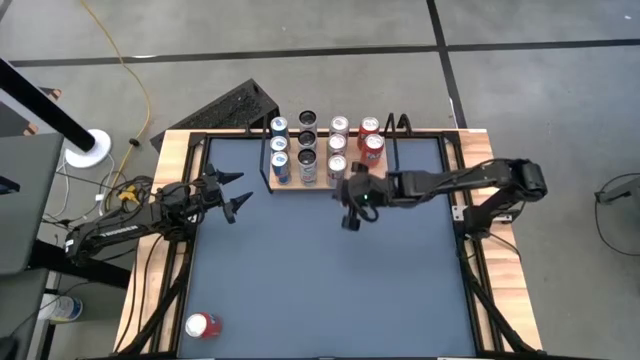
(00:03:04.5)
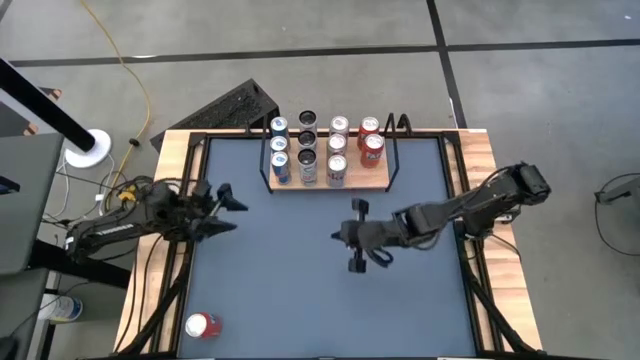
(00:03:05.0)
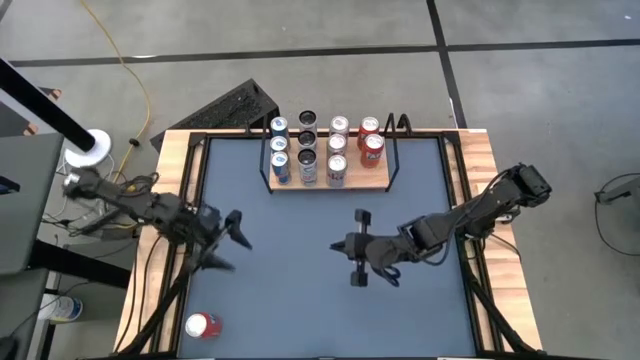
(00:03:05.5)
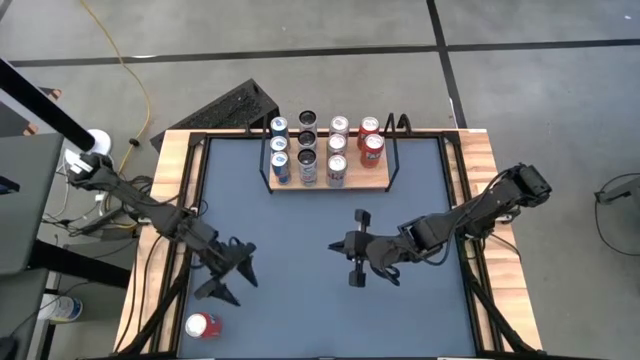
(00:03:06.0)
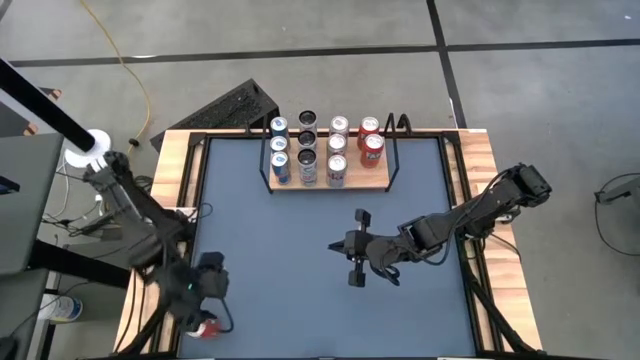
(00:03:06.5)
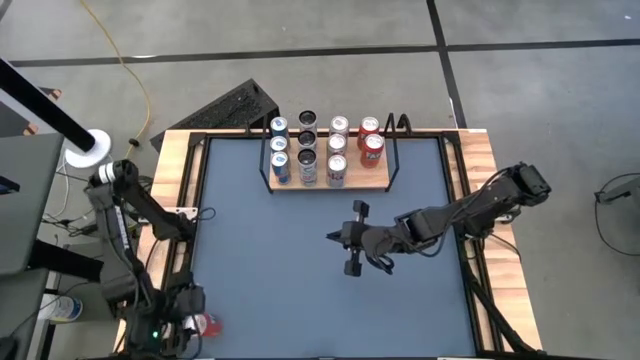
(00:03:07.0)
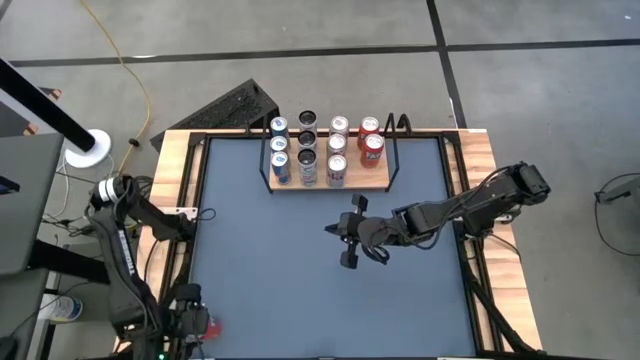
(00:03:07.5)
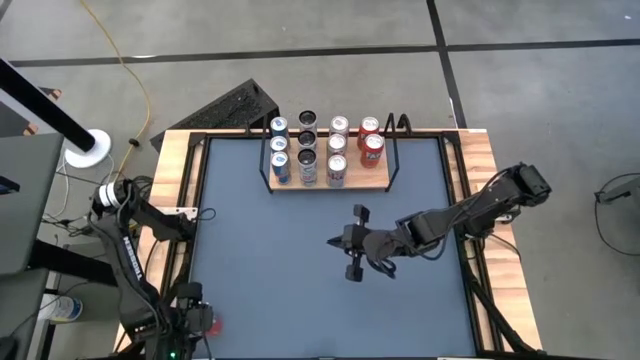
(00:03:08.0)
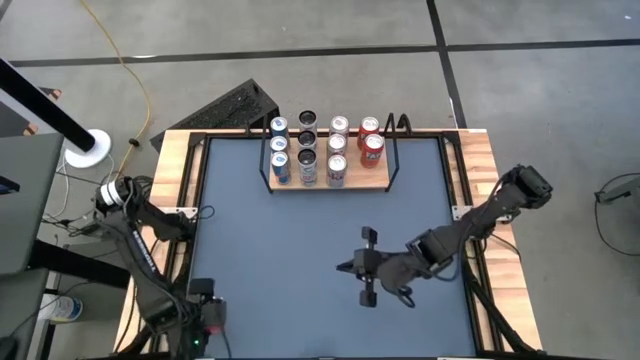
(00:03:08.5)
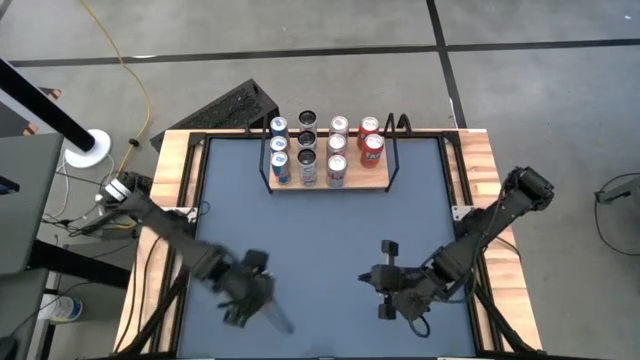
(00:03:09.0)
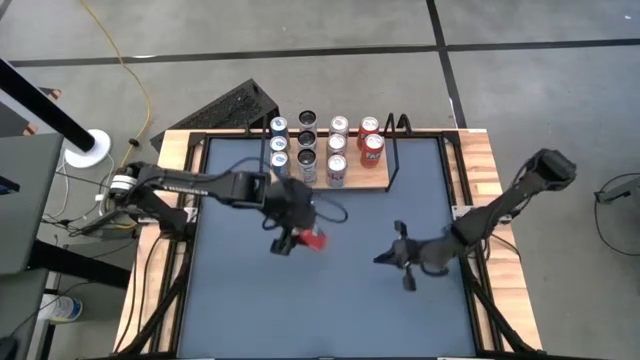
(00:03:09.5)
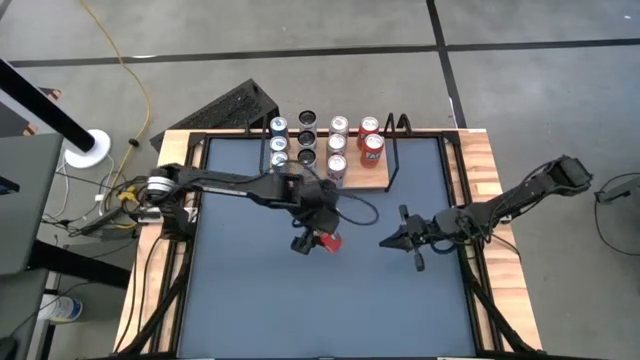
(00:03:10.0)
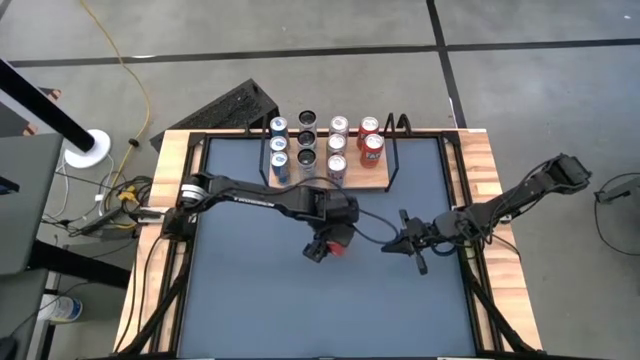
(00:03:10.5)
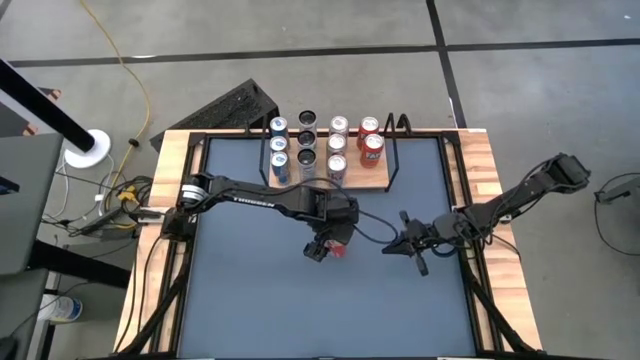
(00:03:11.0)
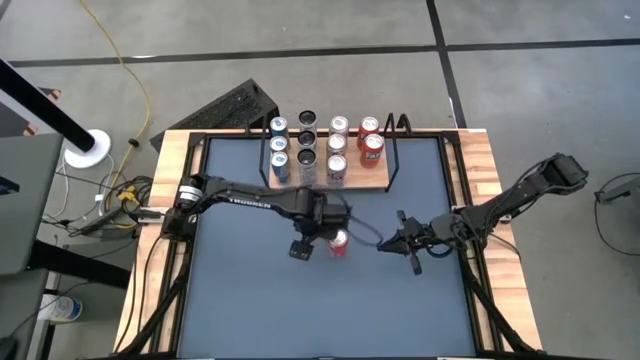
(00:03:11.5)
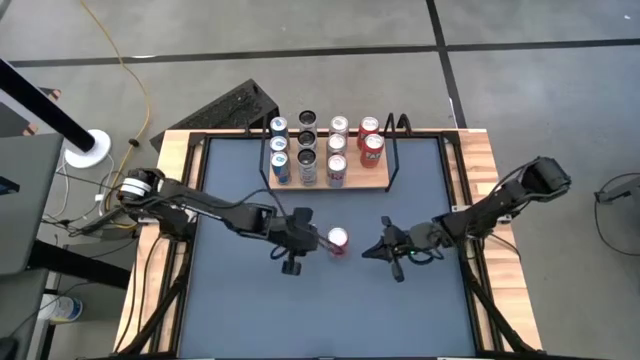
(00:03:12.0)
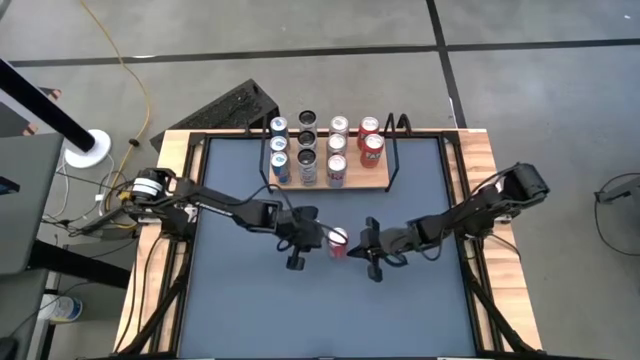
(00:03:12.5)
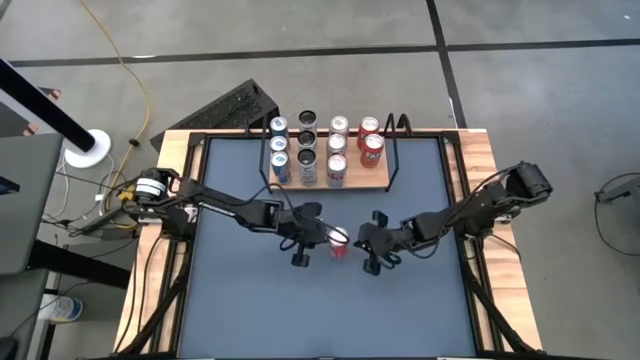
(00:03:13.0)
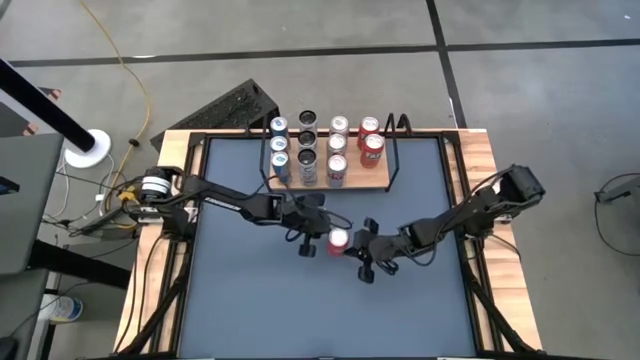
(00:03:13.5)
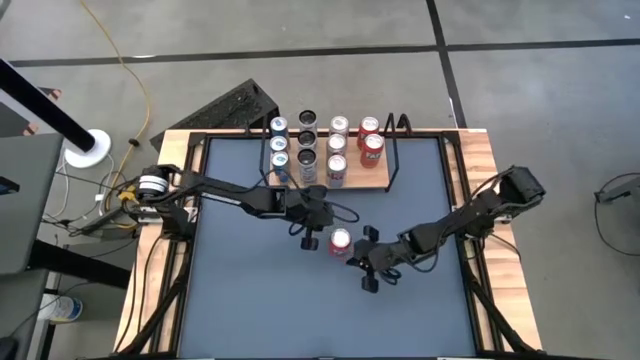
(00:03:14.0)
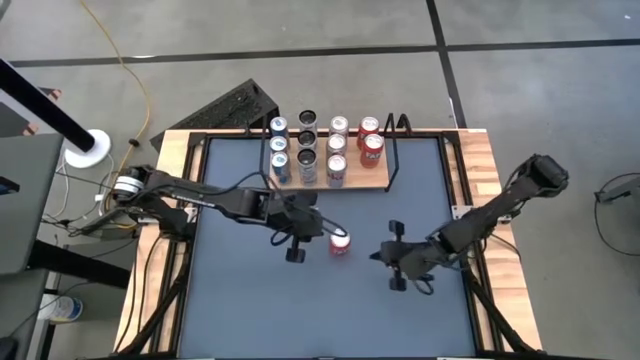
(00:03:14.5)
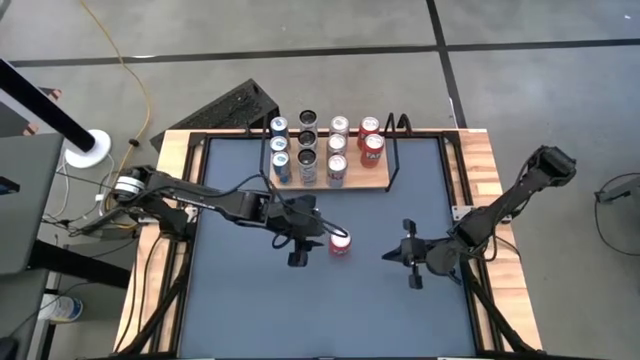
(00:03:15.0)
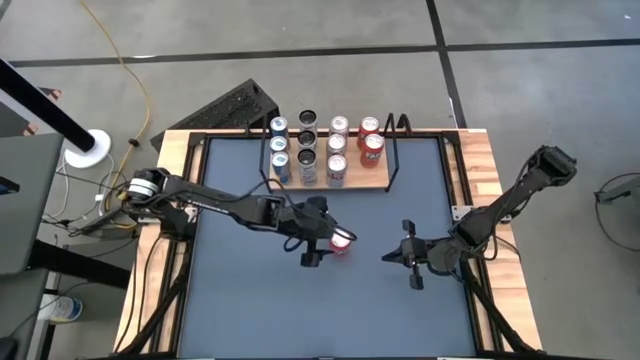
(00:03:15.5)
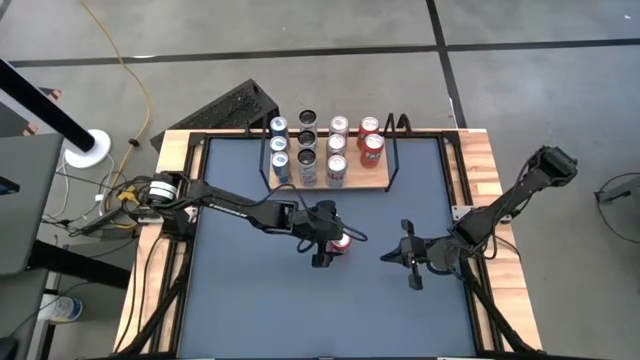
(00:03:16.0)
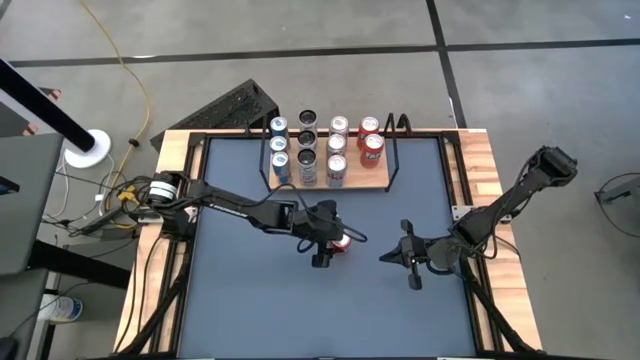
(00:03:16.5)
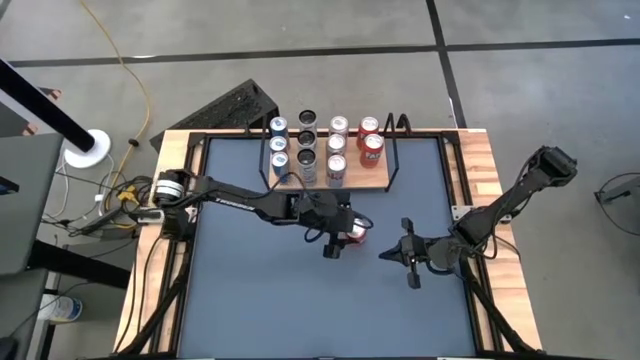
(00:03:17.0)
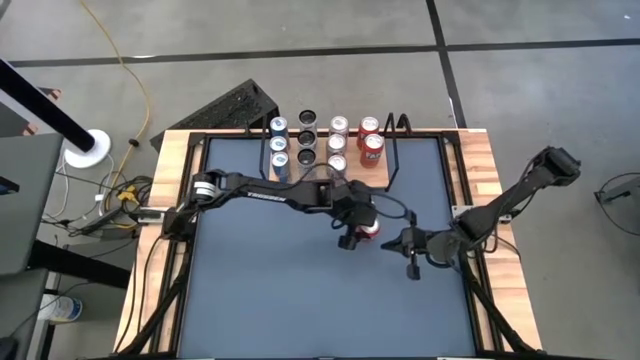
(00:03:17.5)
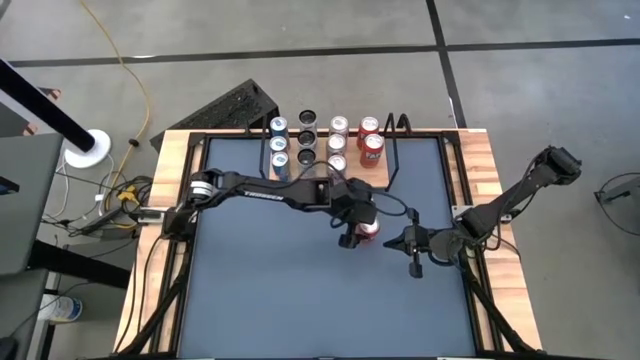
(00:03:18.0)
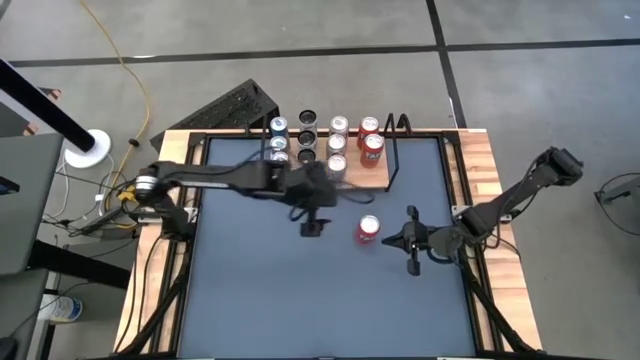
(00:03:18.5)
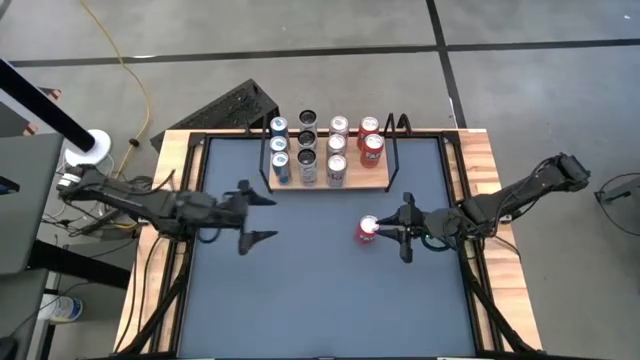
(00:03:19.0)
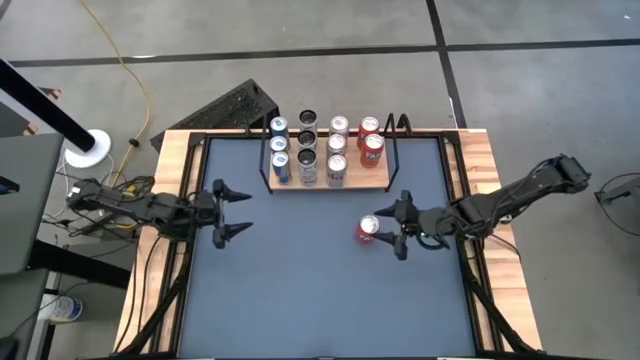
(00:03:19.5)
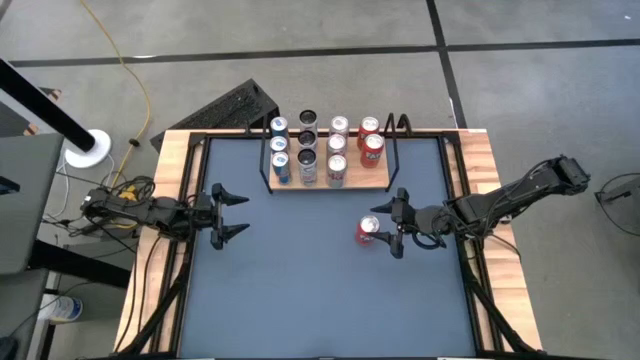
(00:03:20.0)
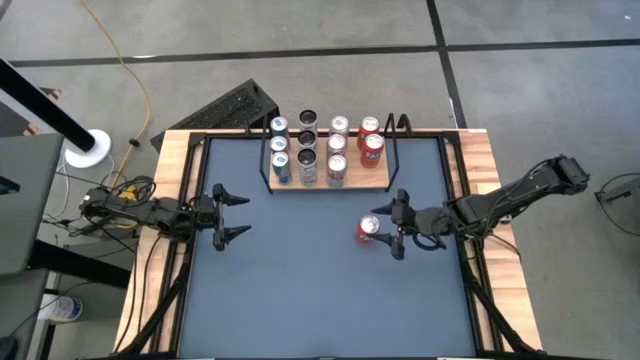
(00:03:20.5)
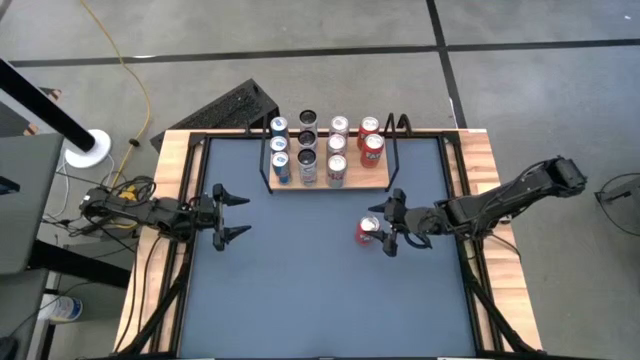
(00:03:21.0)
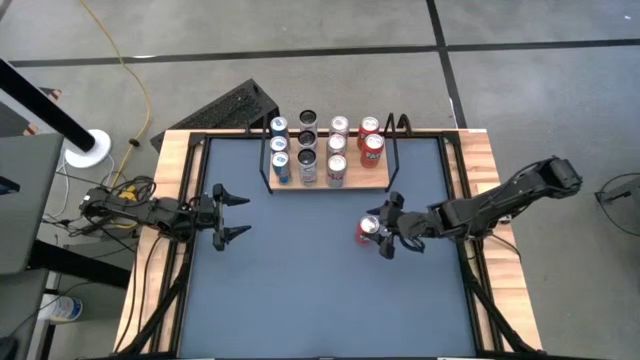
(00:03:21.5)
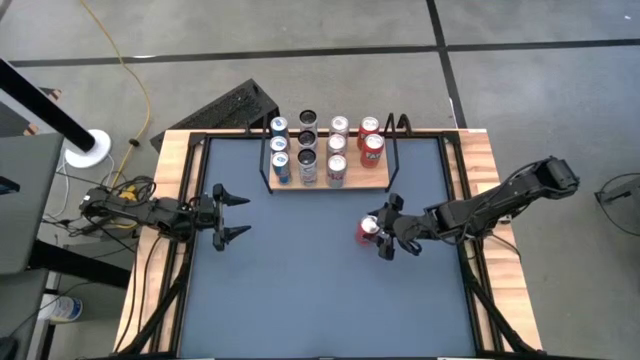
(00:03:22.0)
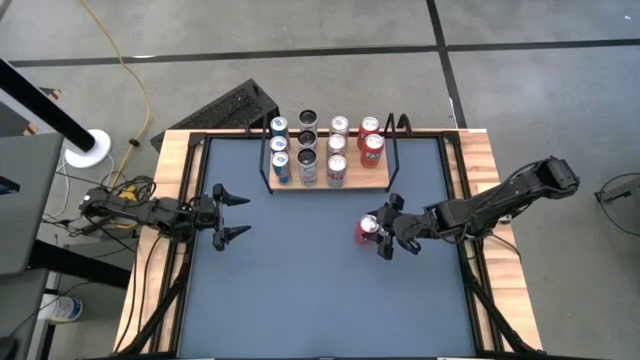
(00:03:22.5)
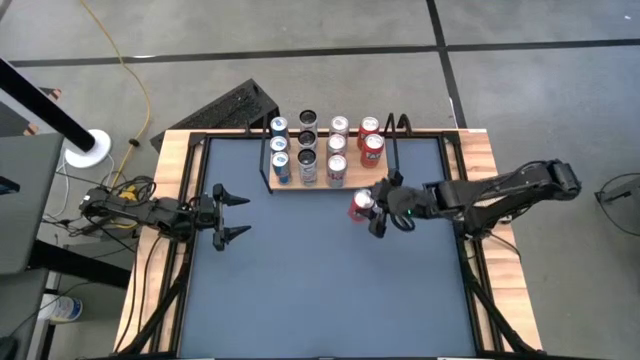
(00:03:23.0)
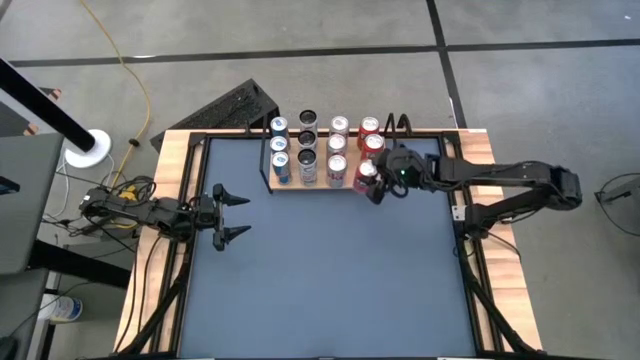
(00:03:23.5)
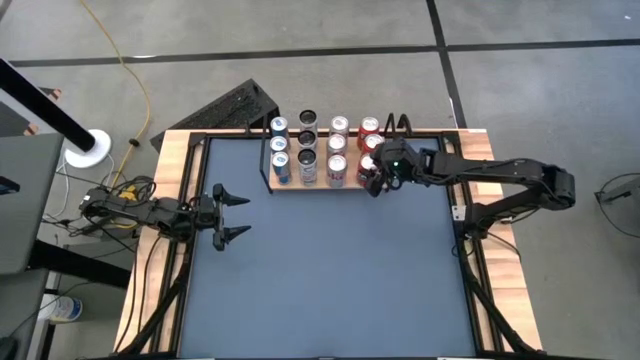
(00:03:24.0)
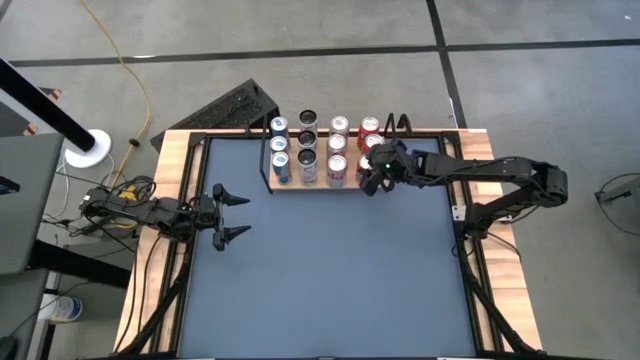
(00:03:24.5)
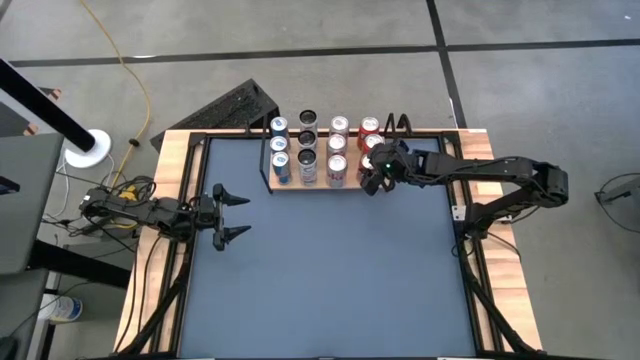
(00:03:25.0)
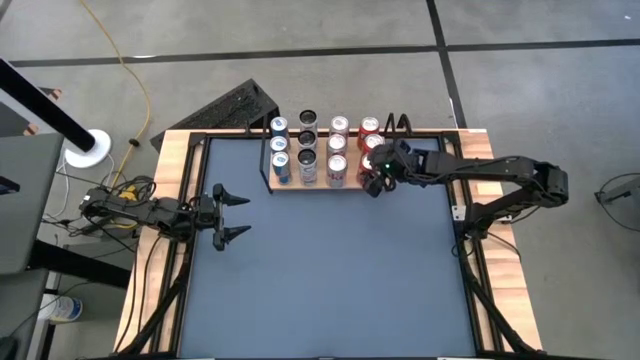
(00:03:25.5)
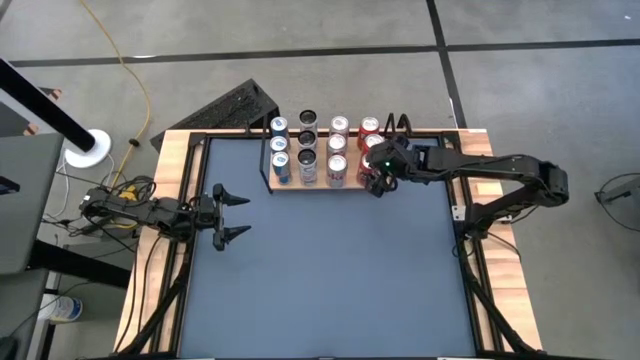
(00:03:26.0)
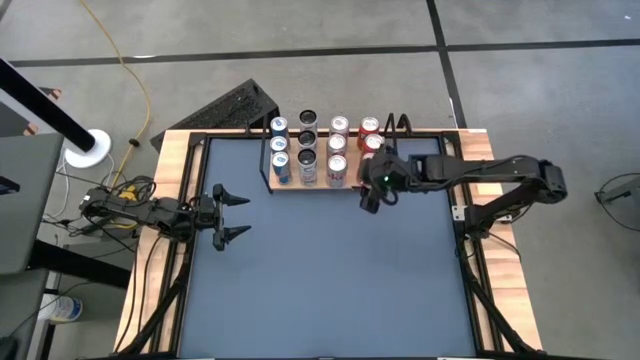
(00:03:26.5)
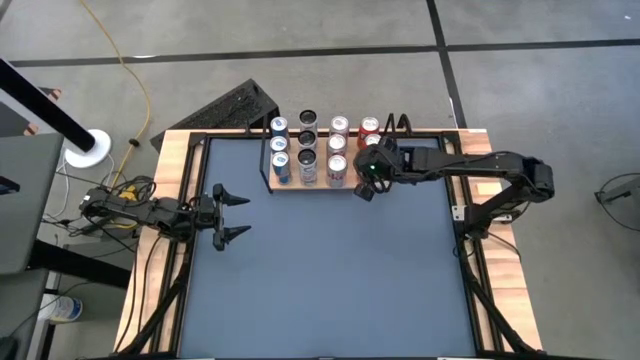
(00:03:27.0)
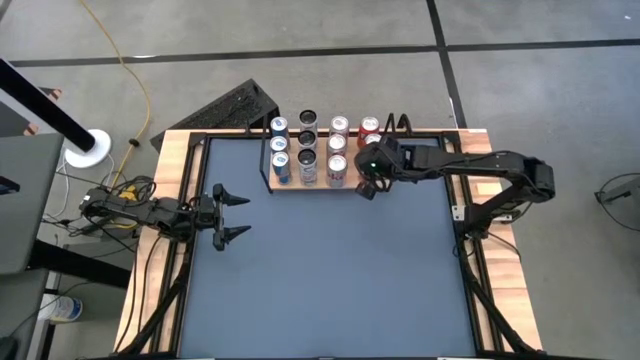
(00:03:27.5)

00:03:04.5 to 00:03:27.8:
Task: Place canned beverage on shelf
Put the orange soda can onto the shelf aligned with the other orange soda cans
